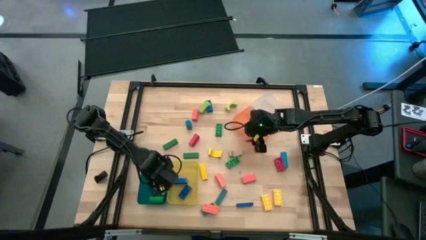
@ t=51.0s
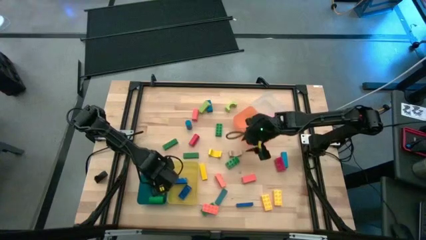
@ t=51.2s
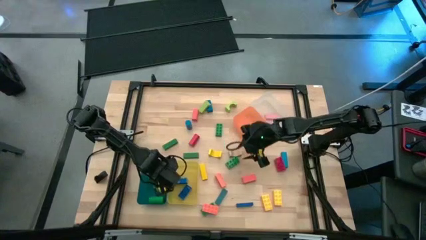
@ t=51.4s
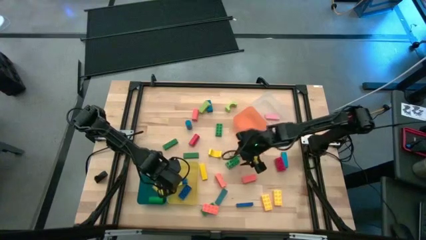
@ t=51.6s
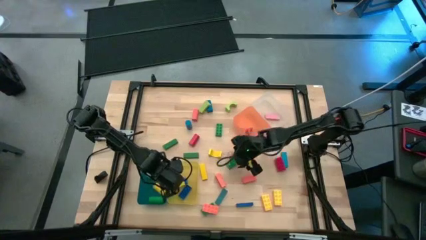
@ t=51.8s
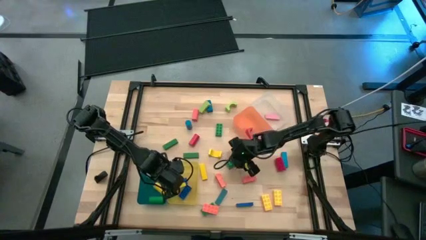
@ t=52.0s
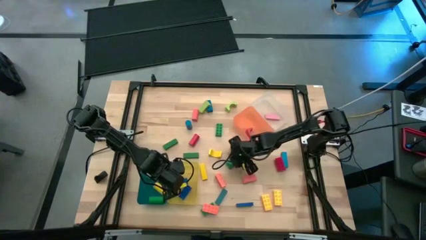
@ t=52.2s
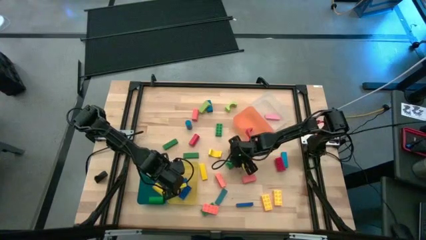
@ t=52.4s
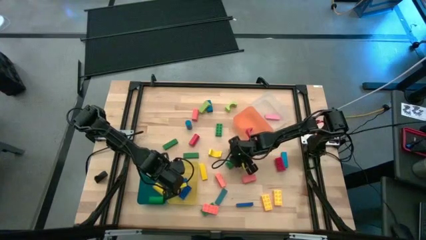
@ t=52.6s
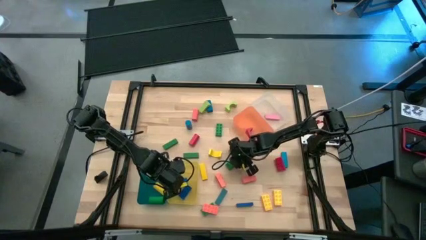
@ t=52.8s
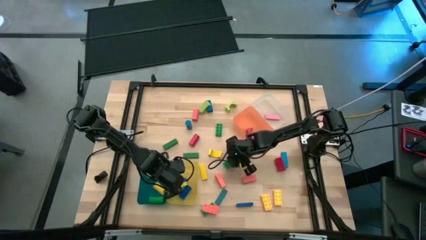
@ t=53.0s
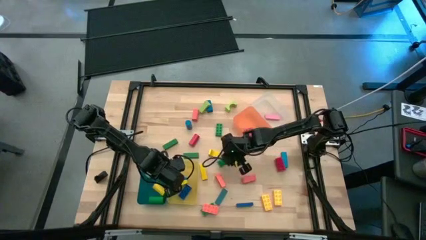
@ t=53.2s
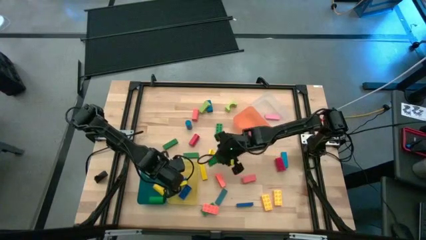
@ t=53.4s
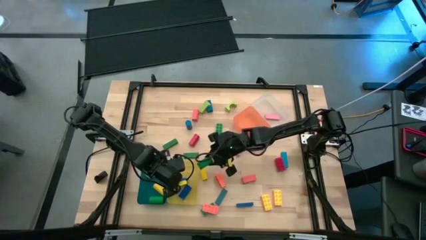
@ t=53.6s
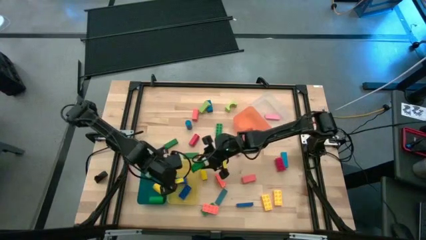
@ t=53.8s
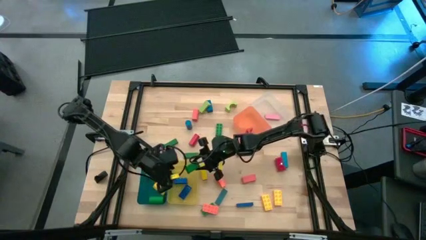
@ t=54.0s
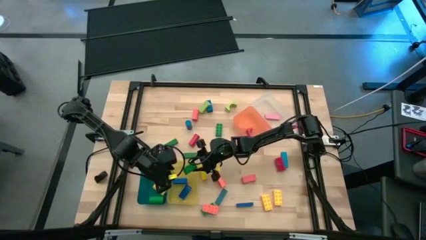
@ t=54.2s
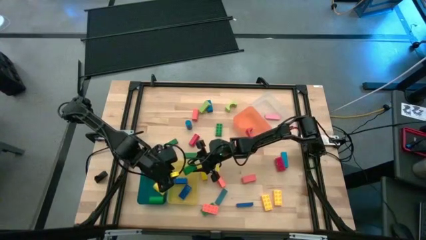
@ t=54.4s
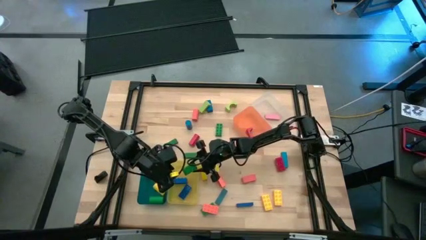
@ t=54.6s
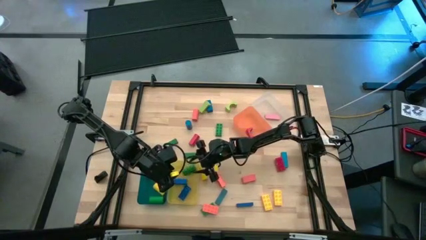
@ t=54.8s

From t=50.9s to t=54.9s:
Task: Sort blocks by size
Put the green rectangle game piece into the yellow bin

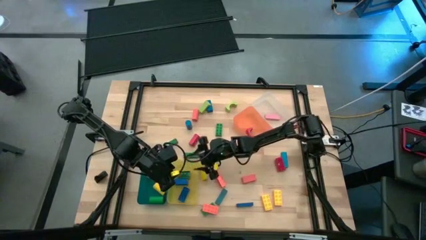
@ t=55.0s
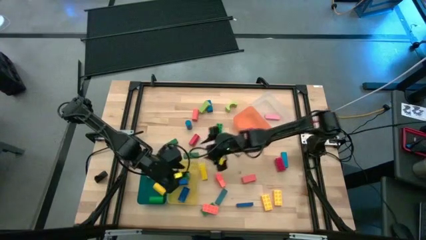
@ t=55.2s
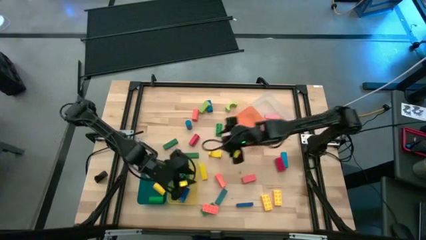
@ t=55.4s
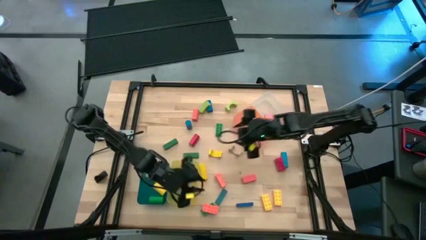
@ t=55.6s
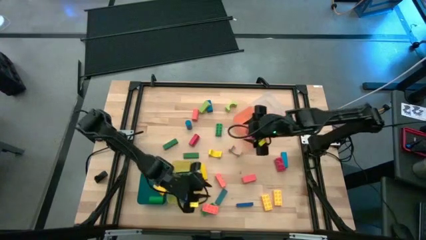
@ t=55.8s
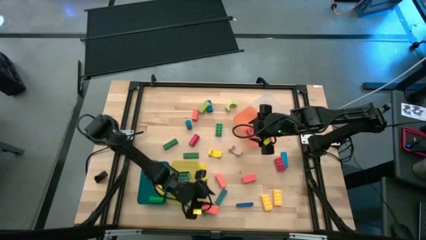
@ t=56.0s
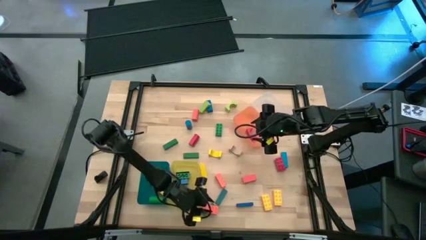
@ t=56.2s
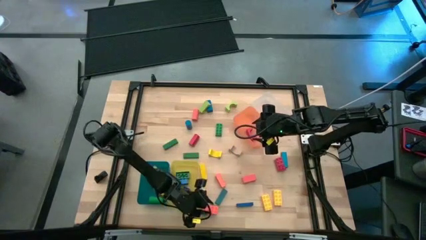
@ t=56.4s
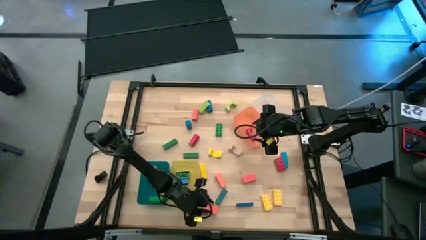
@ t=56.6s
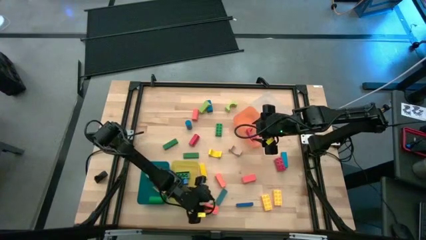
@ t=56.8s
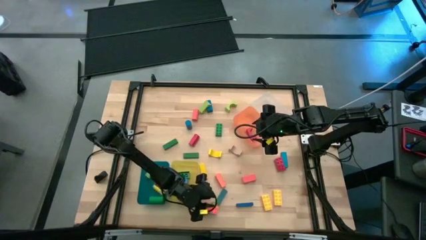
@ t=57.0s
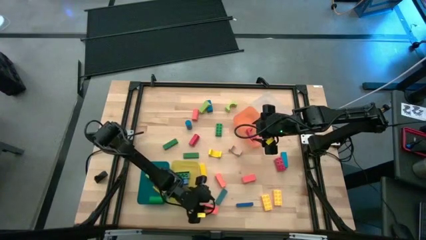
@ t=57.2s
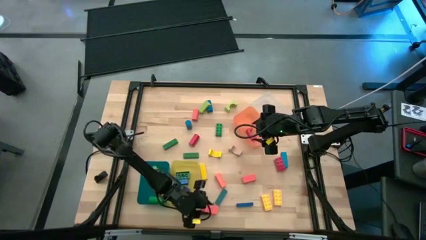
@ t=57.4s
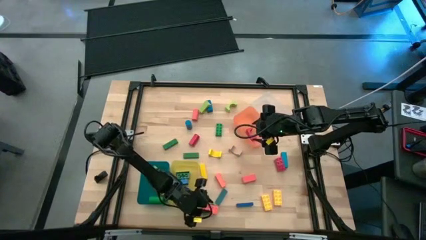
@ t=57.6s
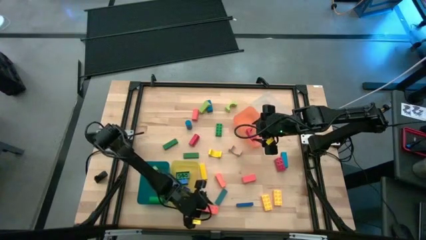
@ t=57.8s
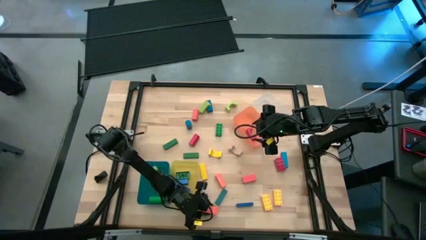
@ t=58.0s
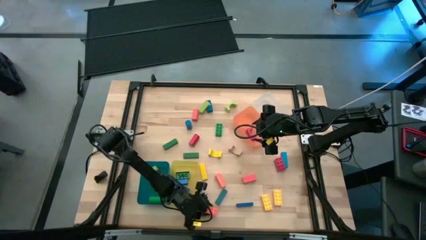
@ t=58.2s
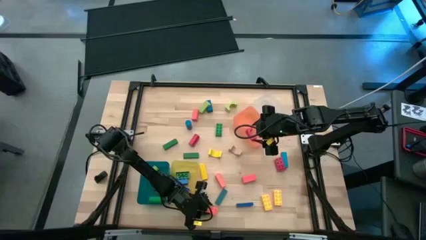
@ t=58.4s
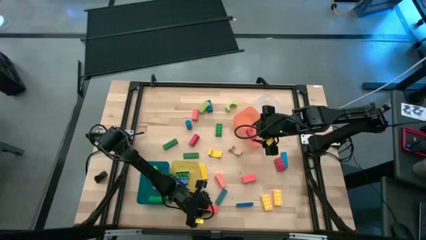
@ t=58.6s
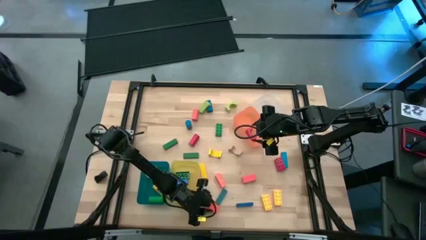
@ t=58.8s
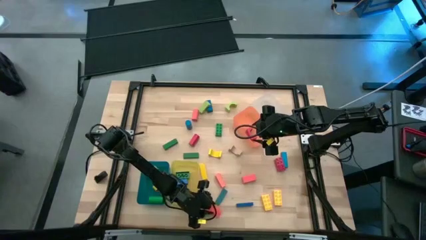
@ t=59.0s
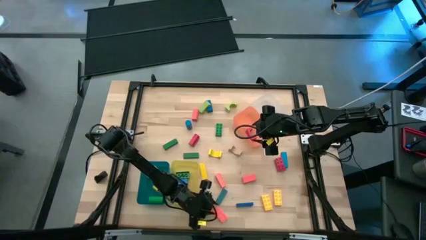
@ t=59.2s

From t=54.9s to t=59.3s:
Put the orange rectangle game piece into the yellow bin

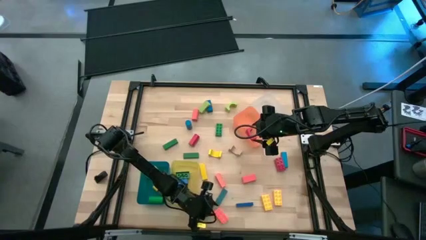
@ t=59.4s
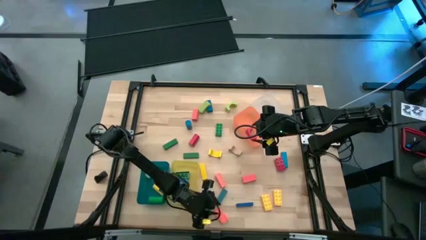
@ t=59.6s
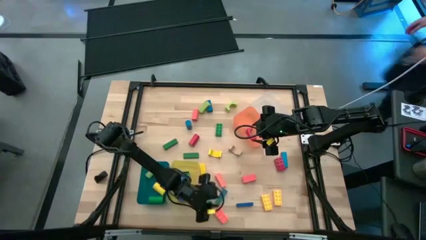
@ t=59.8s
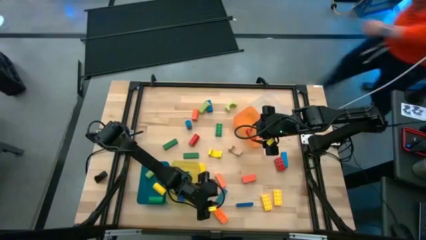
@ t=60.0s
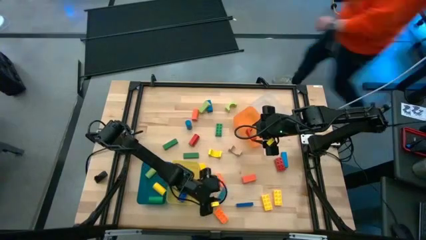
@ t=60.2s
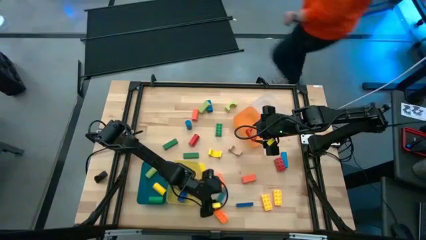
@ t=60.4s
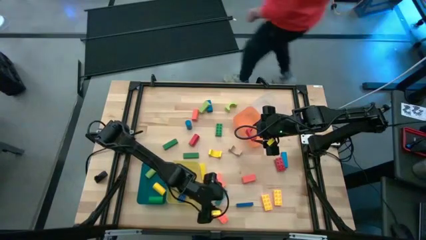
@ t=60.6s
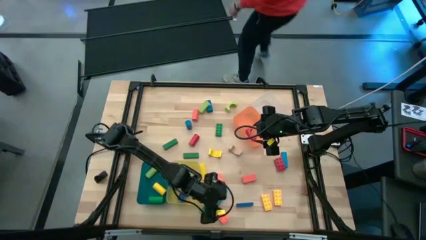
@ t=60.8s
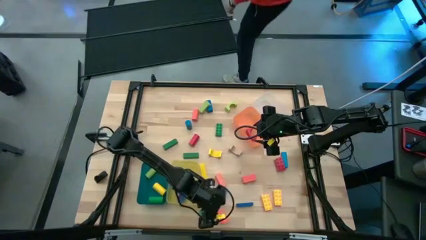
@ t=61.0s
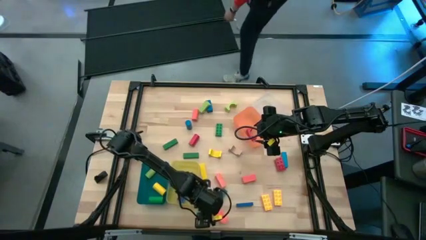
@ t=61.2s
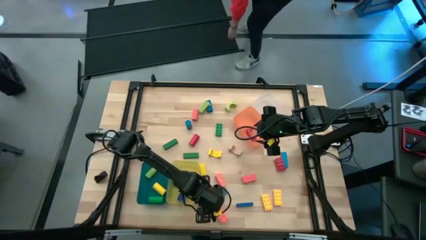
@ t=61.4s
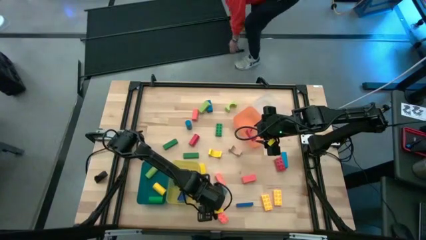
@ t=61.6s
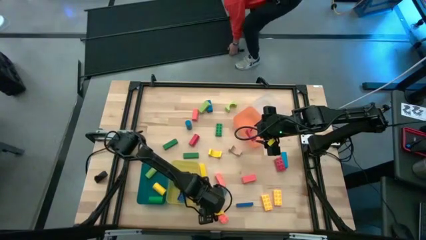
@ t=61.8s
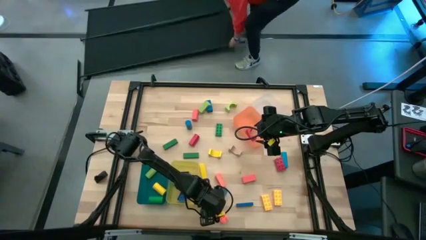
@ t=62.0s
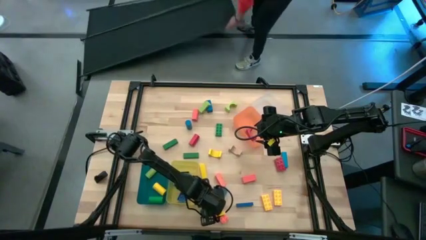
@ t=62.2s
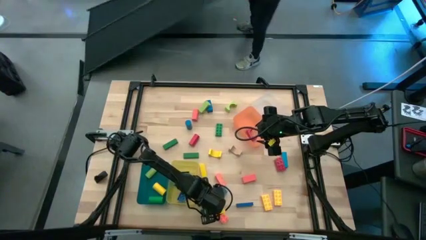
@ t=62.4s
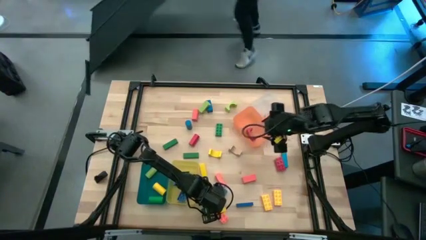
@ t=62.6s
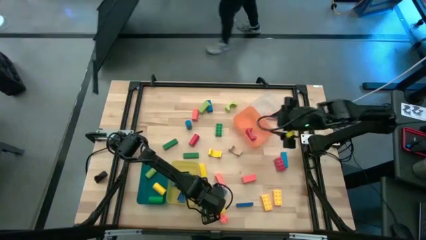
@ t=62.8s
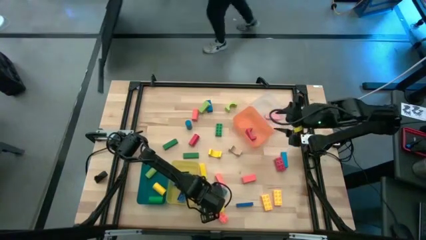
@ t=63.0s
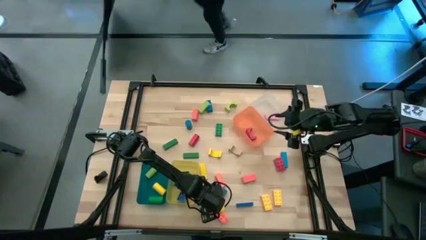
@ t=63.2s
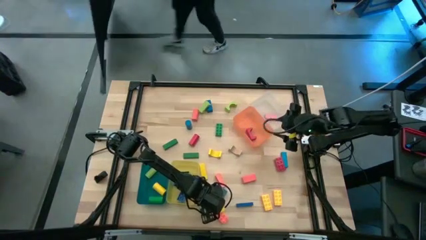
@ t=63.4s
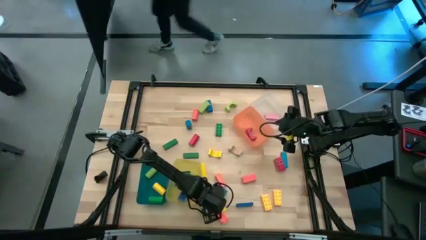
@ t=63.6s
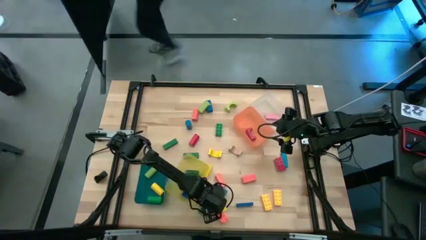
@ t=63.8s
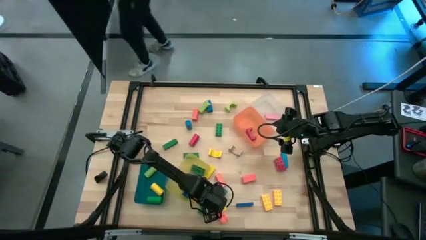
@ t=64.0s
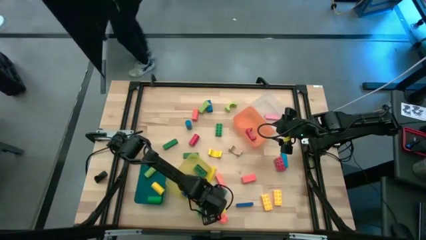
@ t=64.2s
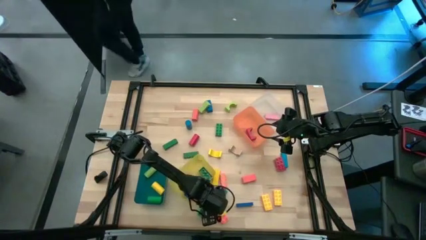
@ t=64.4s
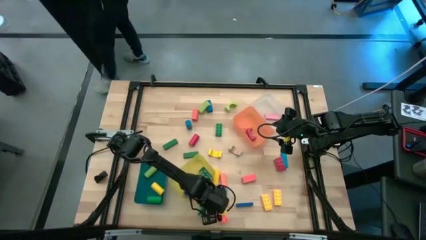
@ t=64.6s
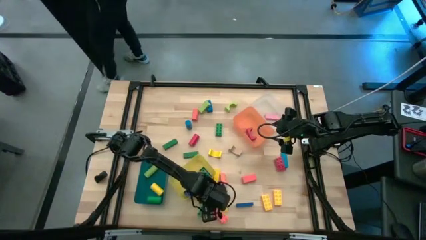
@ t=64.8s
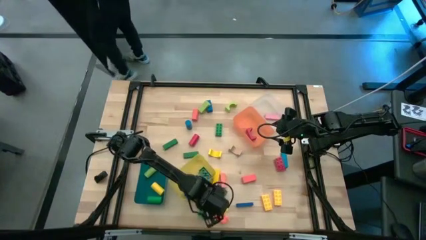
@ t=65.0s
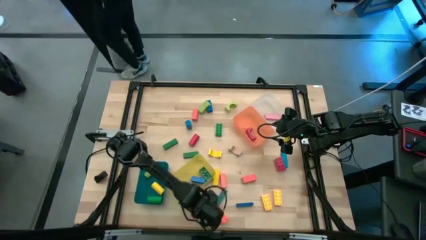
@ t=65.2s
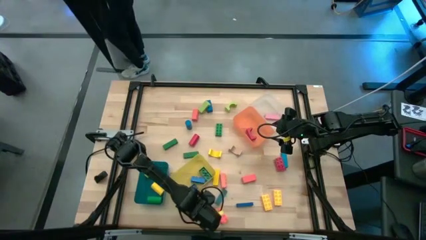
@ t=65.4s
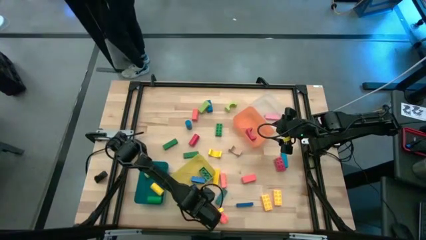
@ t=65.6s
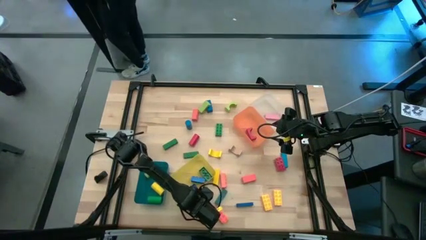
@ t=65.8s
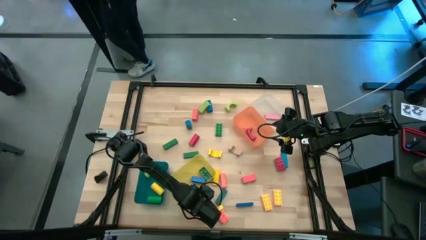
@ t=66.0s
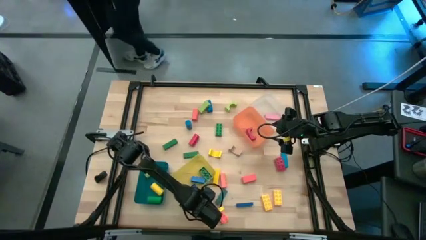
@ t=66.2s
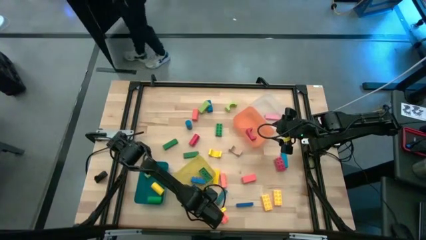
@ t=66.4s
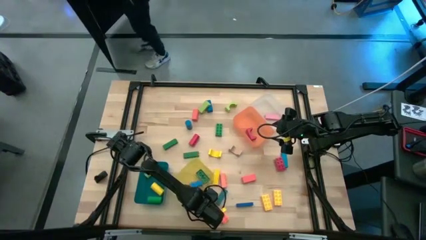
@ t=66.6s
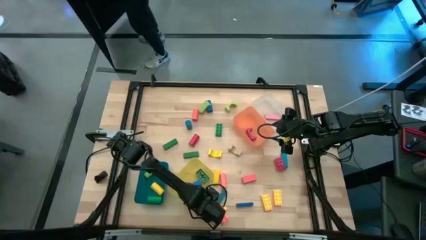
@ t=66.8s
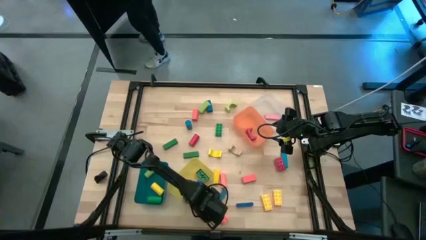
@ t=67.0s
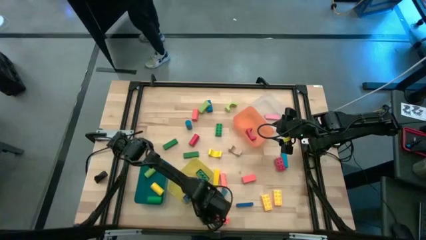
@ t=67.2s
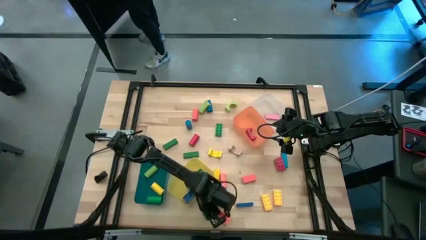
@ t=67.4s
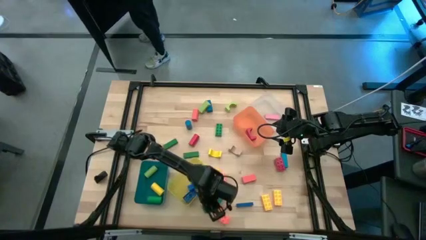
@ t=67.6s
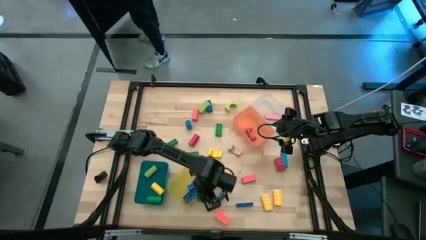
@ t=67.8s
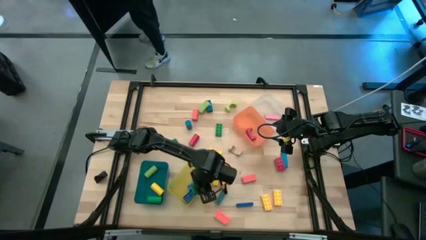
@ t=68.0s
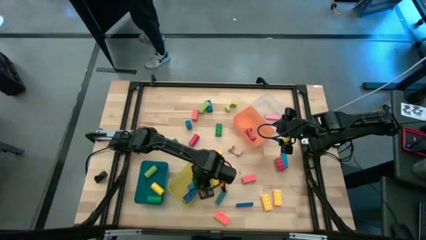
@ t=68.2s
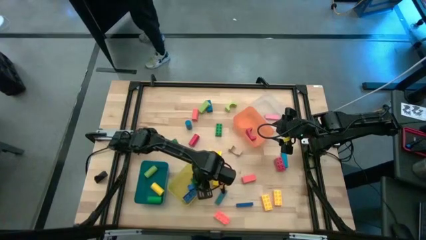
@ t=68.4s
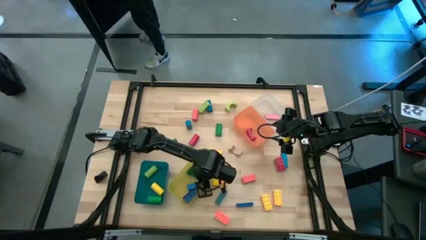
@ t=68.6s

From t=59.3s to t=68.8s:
Put the green rectangle game piece into the yellow bin
